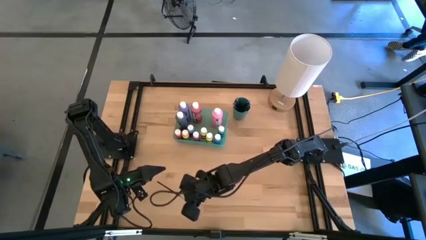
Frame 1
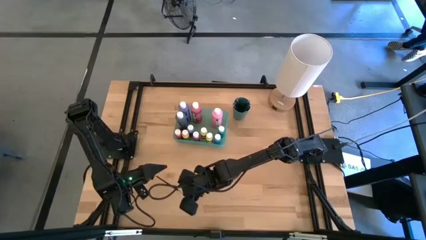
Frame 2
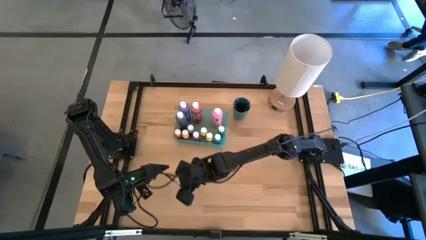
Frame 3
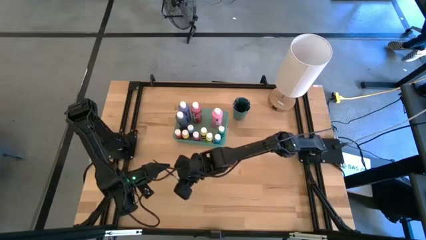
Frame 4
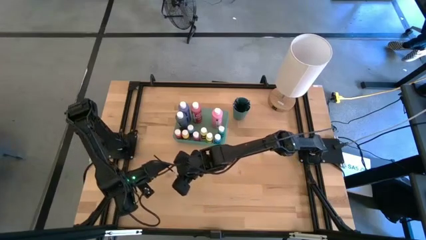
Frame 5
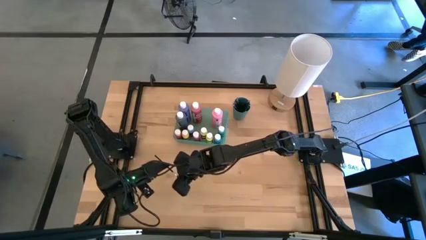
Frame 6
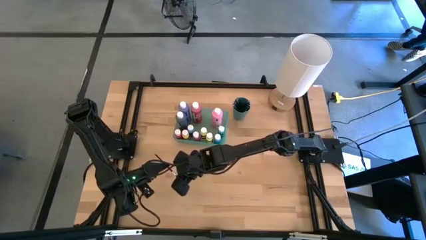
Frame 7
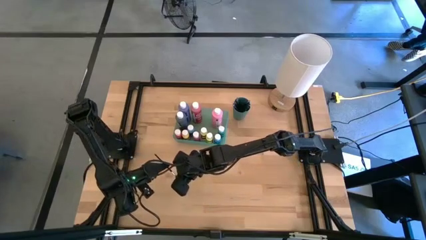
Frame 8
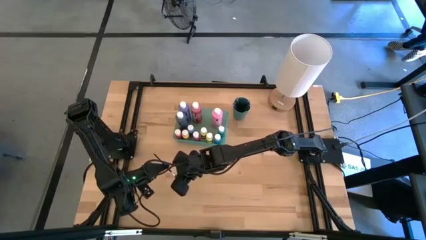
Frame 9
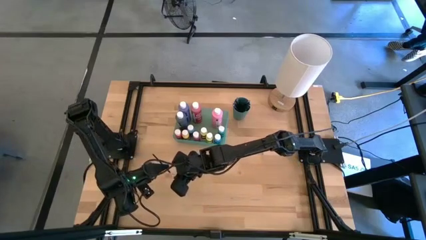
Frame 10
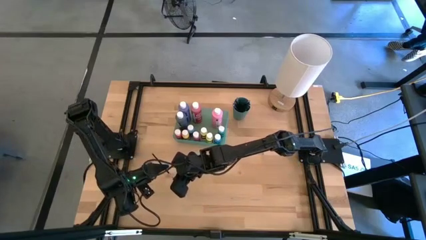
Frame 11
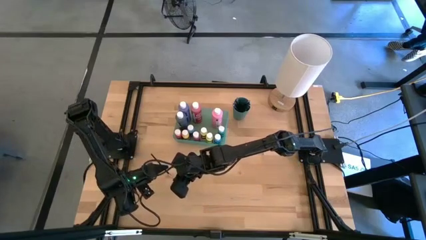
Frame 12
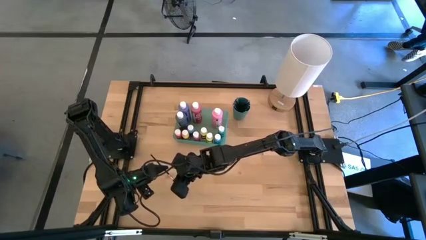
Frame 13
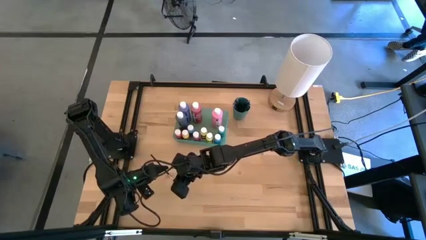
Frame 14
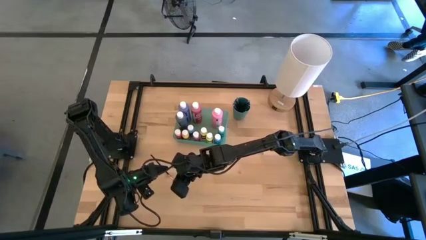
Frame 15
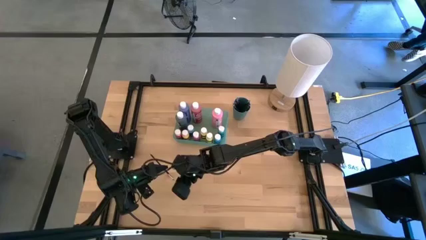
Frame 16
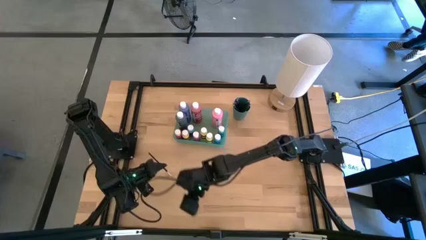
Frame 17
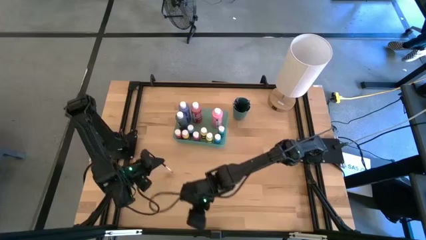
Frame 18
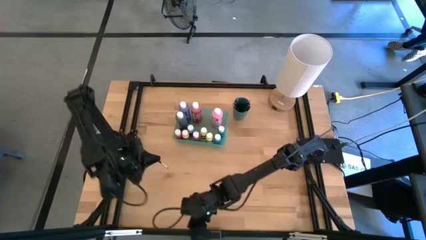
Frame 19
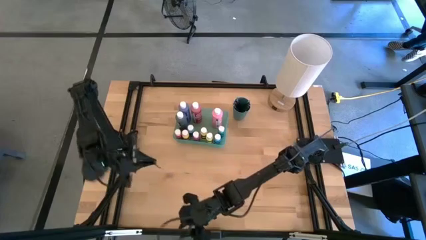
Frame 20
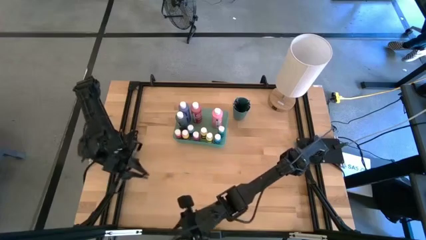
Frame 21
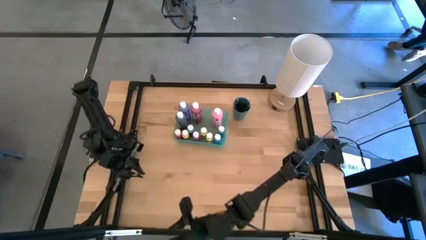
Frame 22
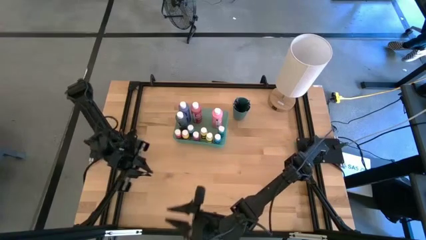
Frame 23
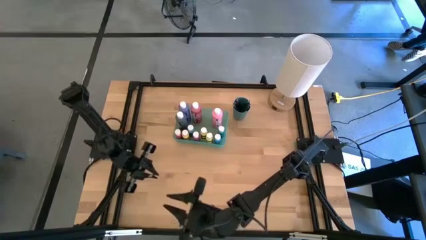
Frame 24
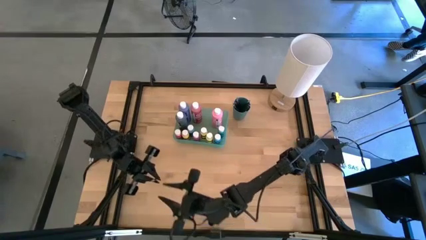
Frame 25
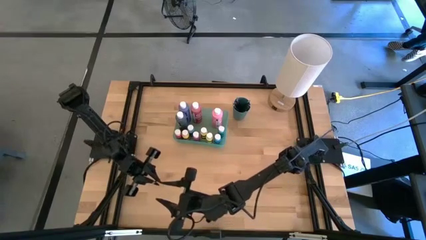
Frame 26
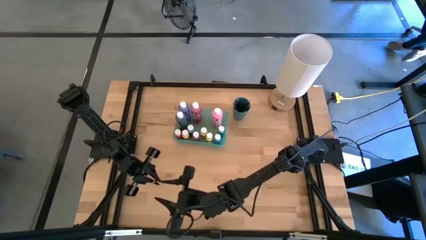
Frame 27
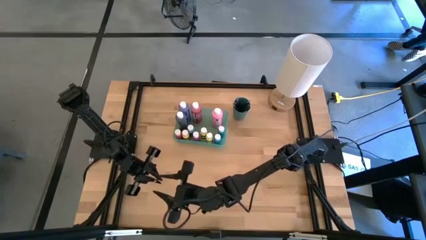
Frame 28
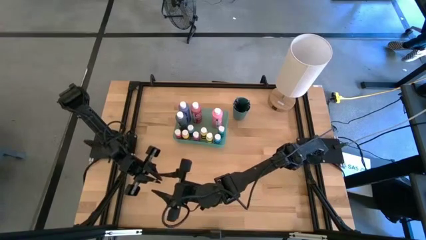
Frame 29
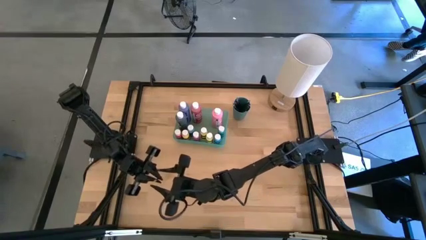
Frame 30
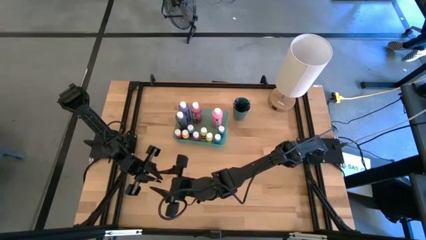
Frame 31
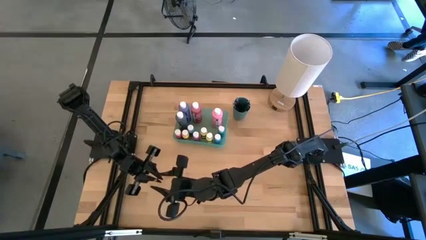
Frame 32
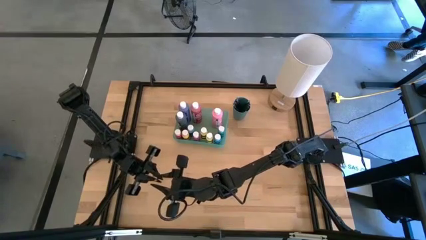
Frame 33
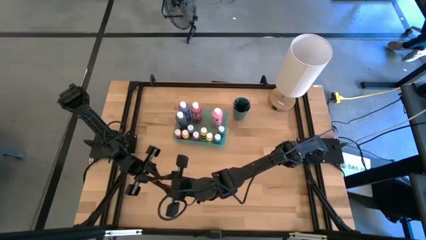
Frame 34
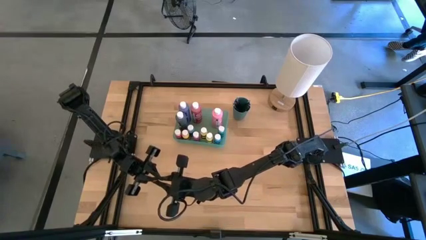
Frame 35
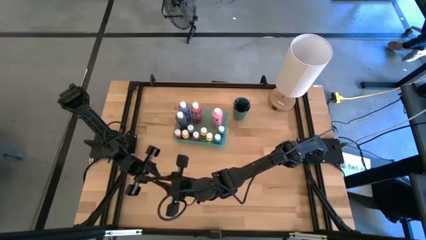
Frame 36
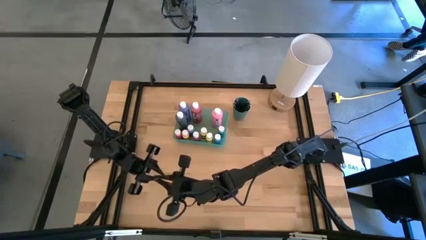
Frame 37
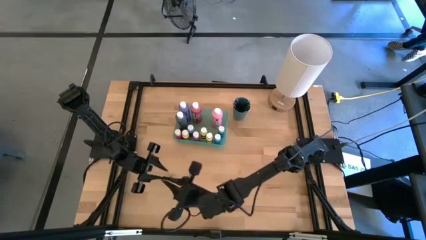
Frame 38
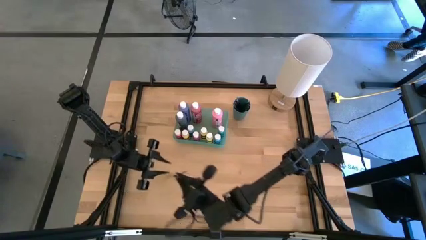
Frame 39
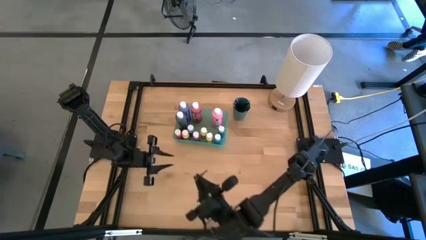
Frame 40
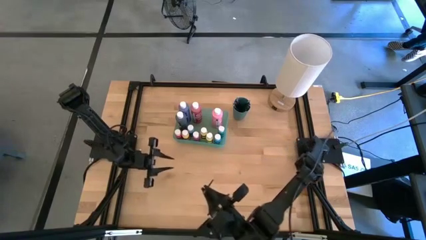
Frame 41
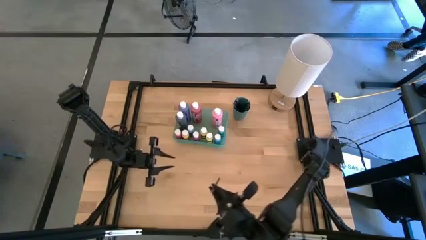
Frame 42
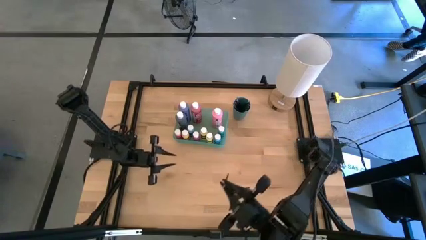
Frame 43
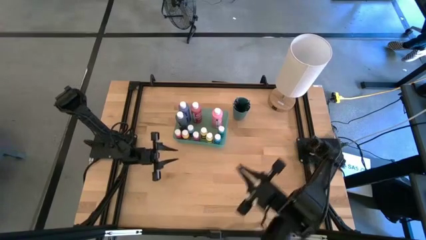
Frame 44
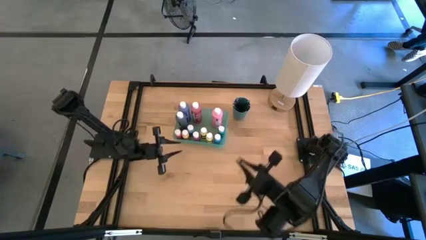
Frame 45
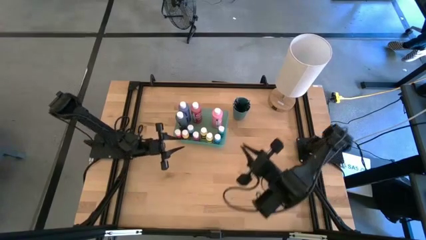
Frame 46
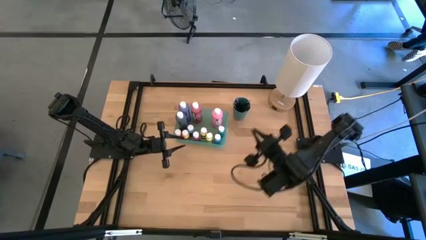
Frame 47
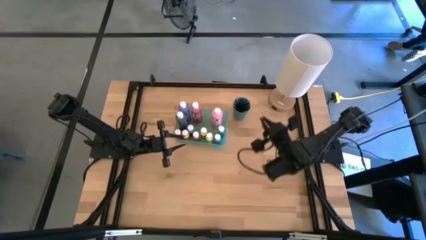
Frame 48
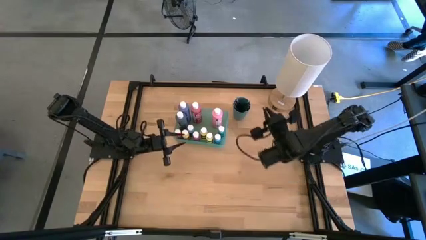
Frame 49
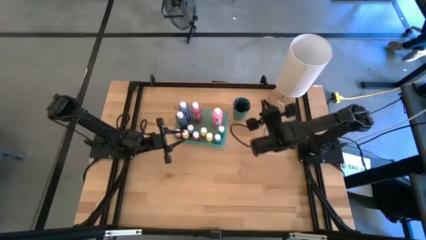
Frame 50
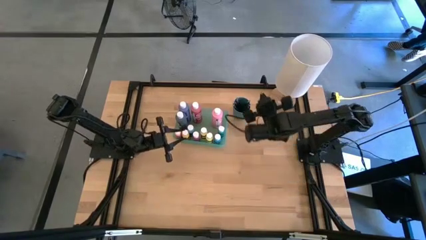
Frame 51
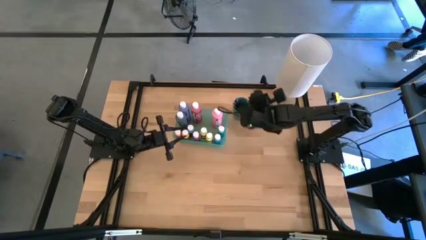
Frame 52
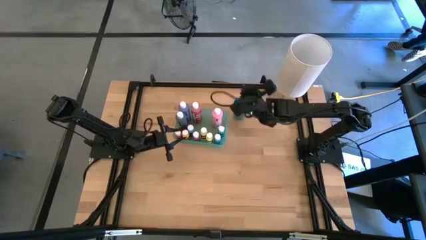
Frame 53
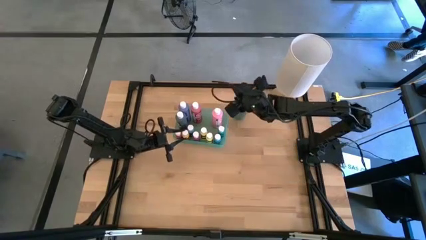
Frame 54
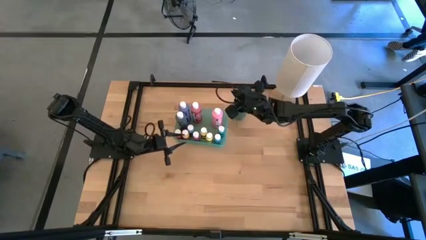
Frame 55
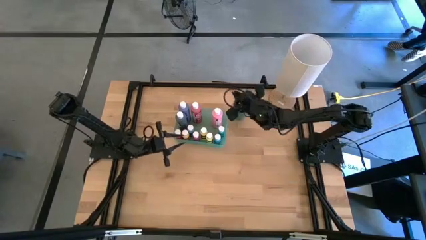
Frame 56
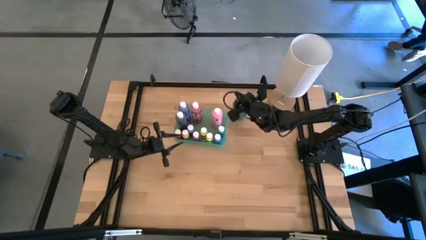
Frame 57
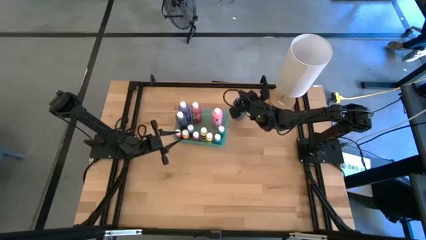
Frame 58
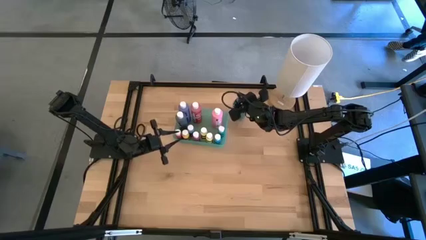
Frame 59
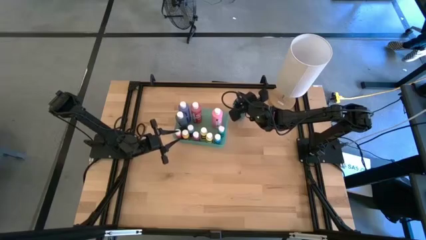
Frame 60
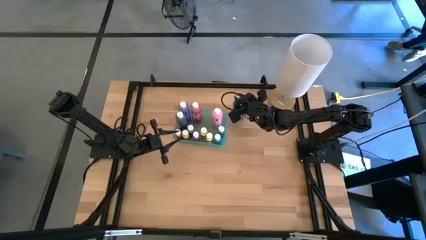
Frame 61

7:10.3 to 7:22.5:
Task: Pick & Place Paint Supplies
Put the black paint brush into the dark green cup
